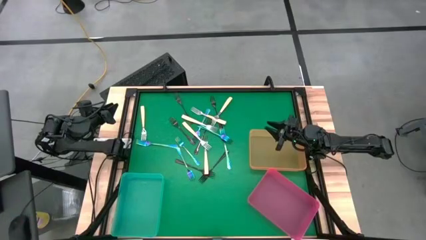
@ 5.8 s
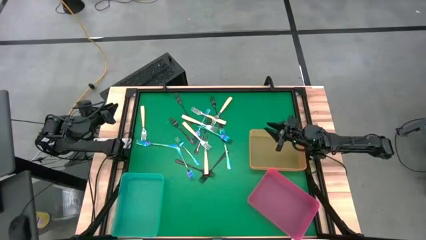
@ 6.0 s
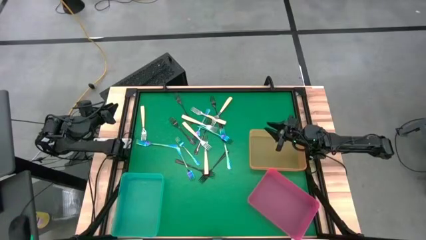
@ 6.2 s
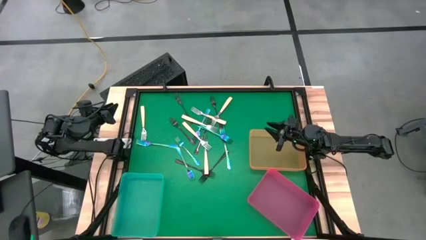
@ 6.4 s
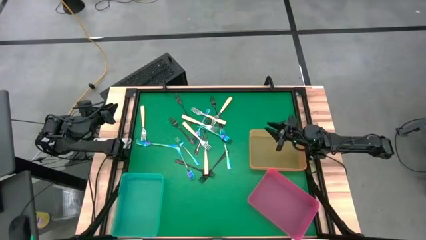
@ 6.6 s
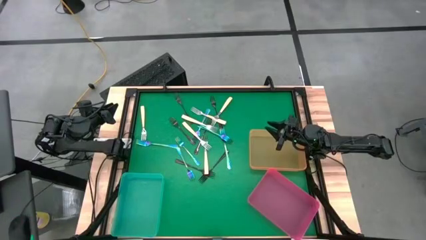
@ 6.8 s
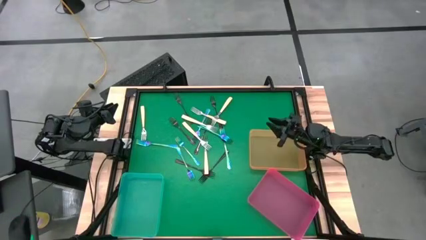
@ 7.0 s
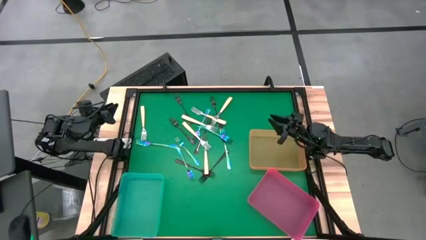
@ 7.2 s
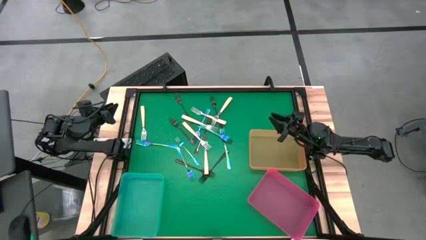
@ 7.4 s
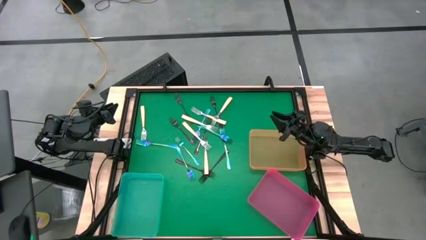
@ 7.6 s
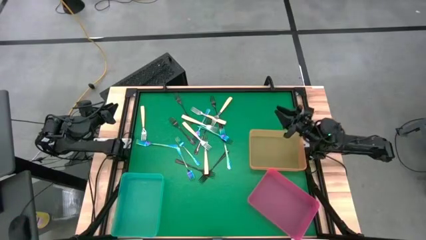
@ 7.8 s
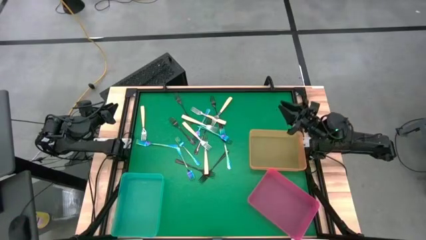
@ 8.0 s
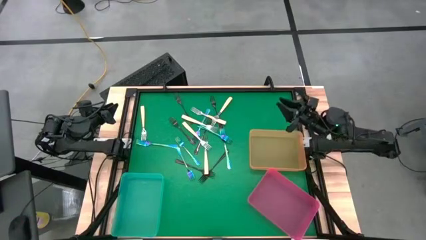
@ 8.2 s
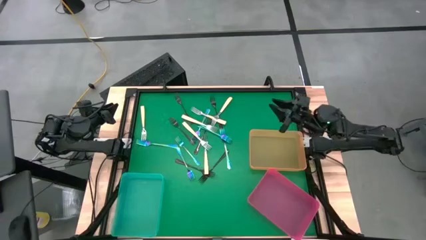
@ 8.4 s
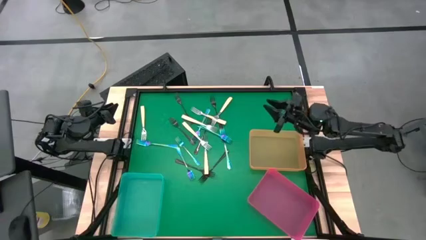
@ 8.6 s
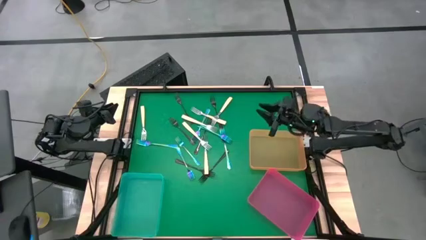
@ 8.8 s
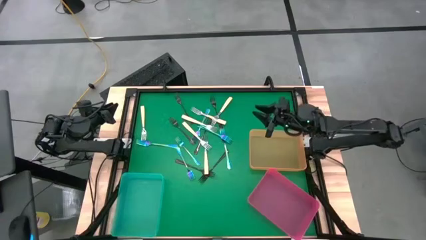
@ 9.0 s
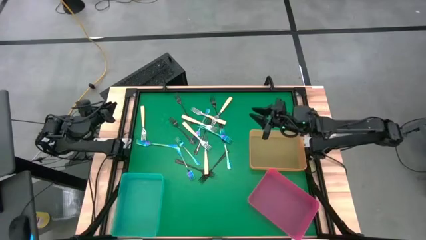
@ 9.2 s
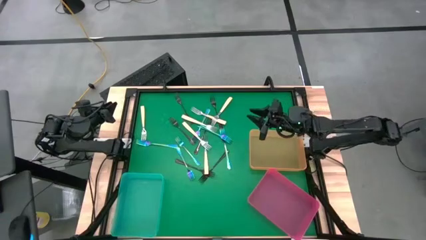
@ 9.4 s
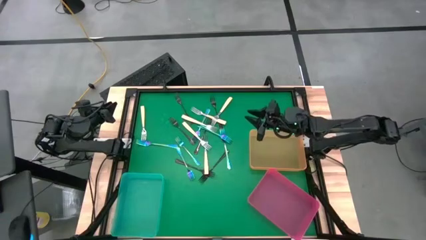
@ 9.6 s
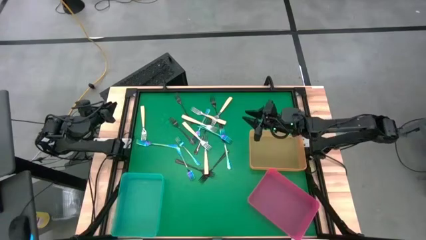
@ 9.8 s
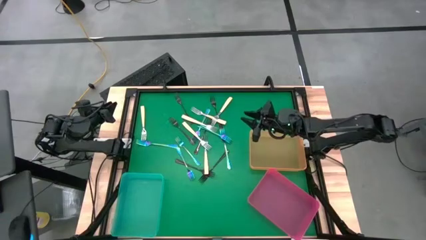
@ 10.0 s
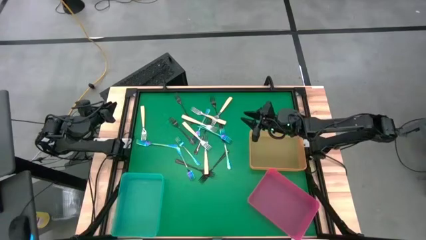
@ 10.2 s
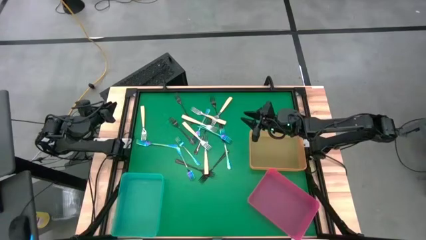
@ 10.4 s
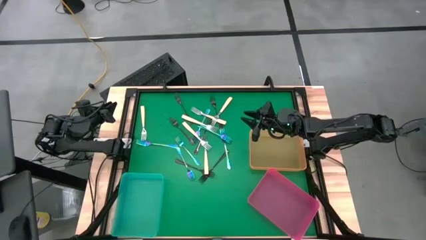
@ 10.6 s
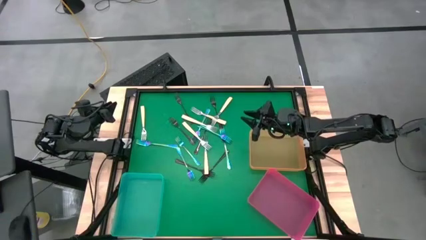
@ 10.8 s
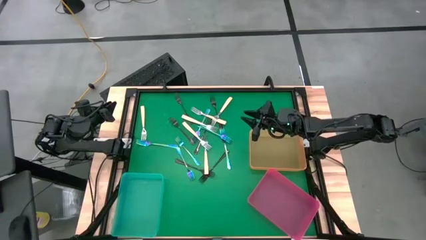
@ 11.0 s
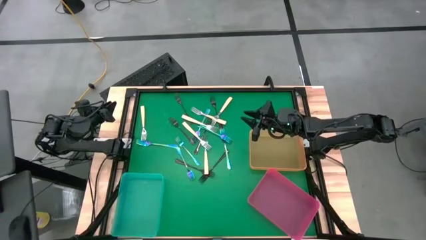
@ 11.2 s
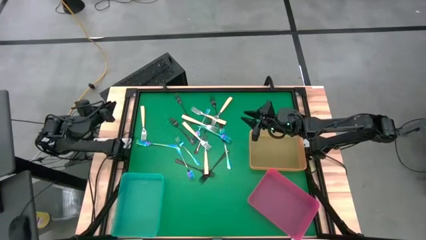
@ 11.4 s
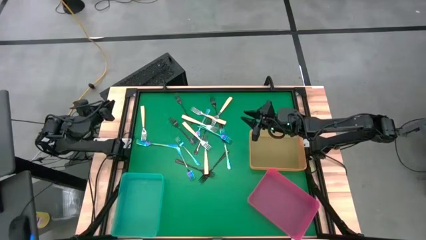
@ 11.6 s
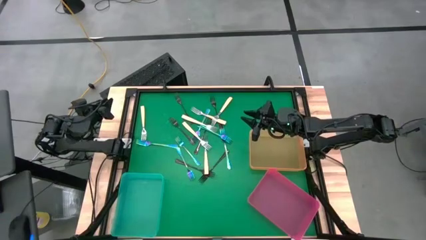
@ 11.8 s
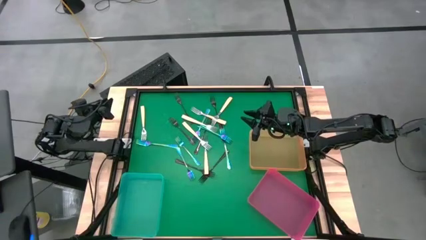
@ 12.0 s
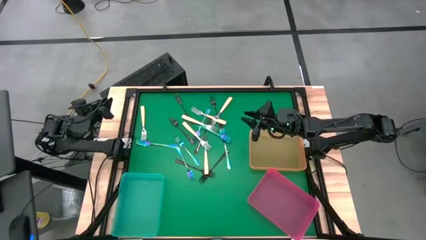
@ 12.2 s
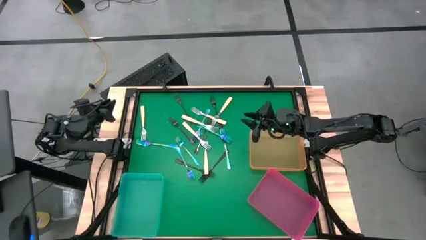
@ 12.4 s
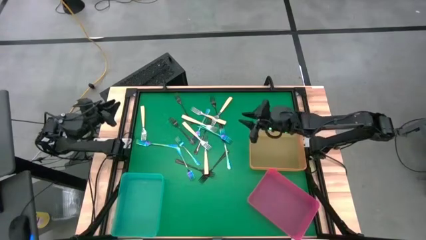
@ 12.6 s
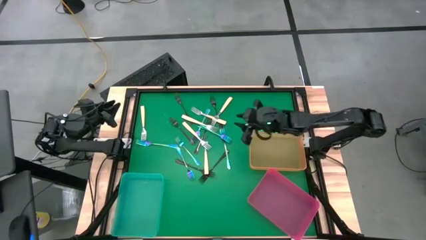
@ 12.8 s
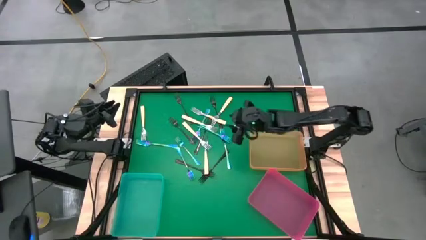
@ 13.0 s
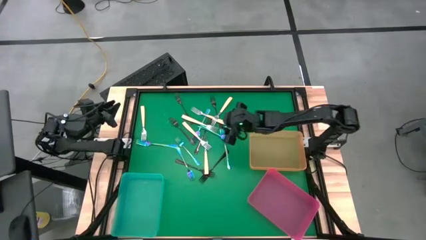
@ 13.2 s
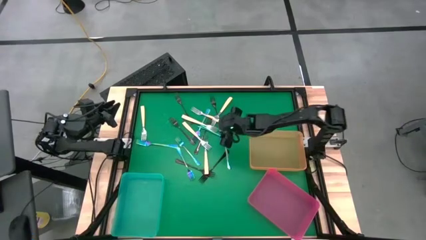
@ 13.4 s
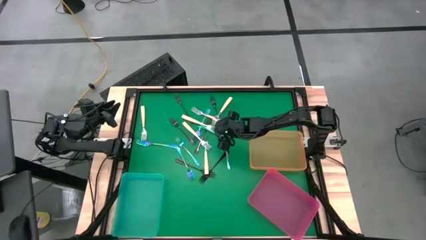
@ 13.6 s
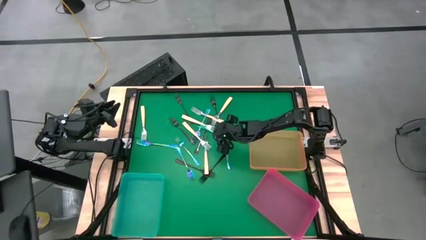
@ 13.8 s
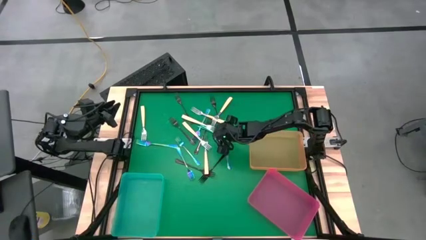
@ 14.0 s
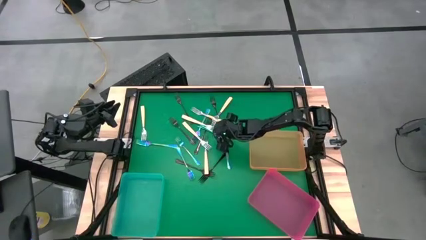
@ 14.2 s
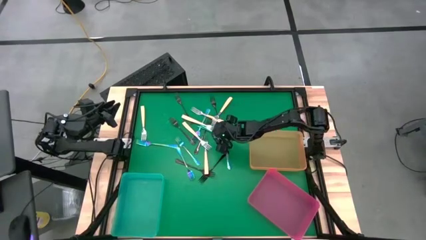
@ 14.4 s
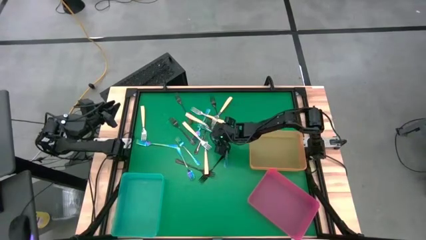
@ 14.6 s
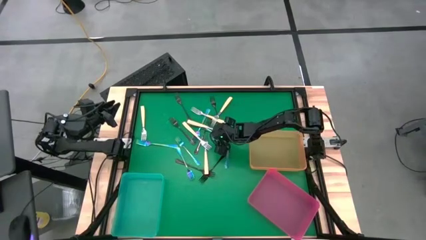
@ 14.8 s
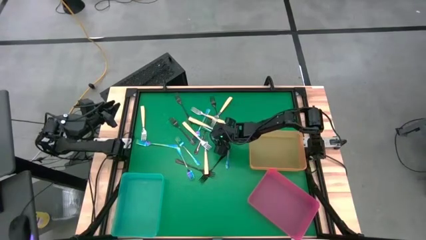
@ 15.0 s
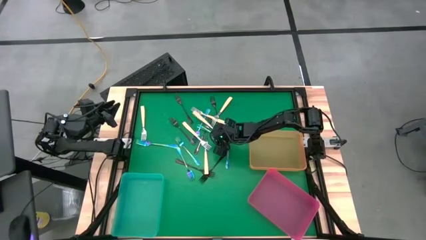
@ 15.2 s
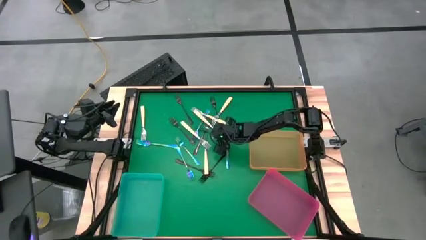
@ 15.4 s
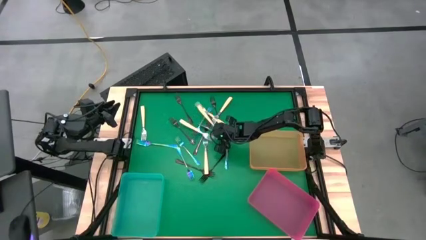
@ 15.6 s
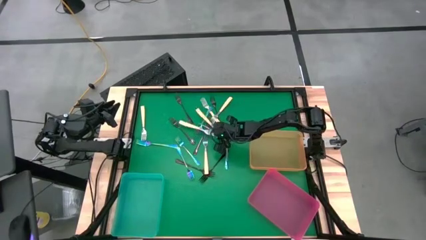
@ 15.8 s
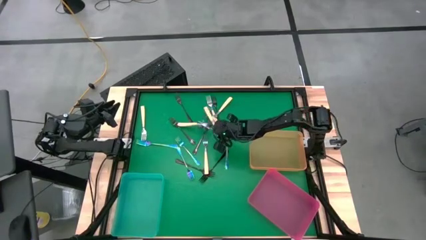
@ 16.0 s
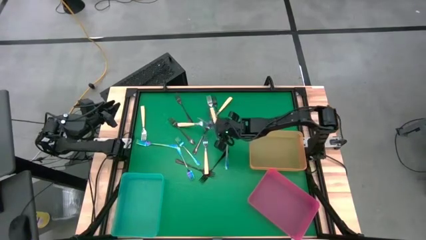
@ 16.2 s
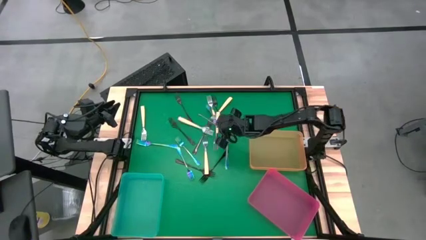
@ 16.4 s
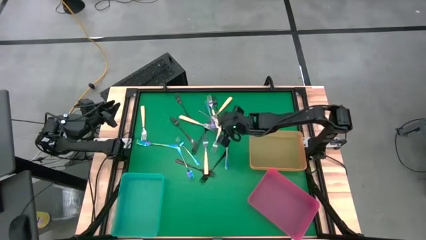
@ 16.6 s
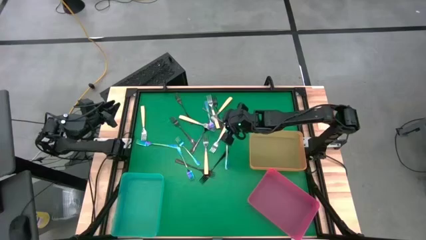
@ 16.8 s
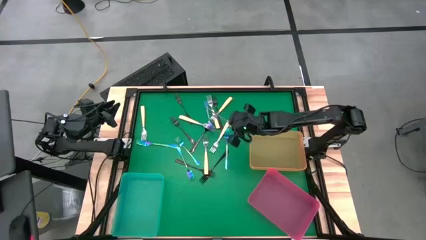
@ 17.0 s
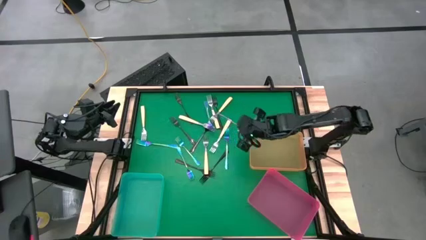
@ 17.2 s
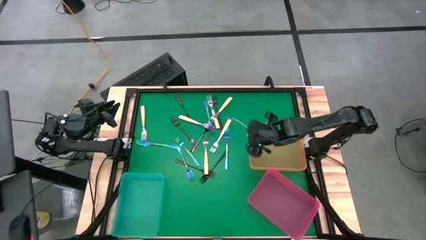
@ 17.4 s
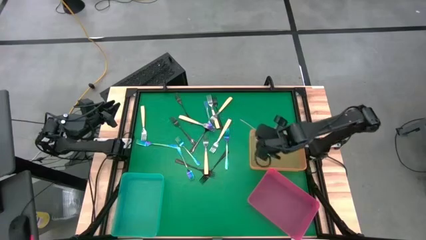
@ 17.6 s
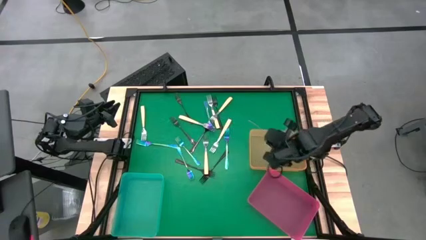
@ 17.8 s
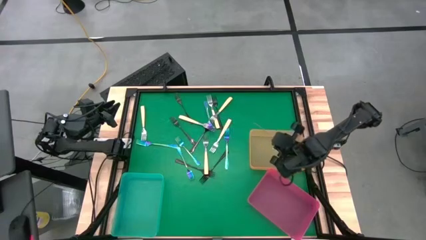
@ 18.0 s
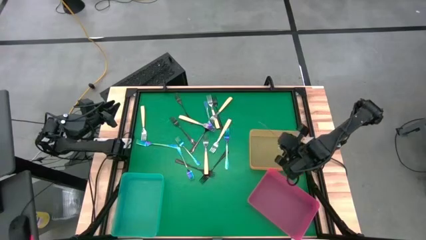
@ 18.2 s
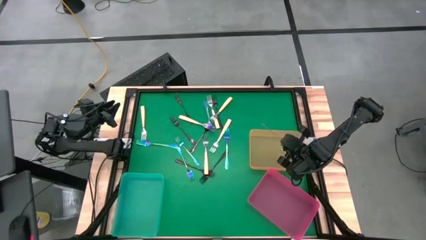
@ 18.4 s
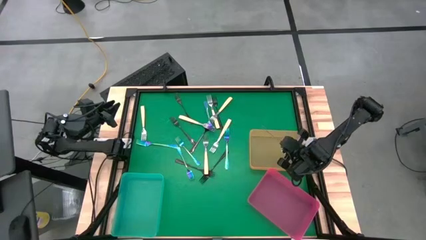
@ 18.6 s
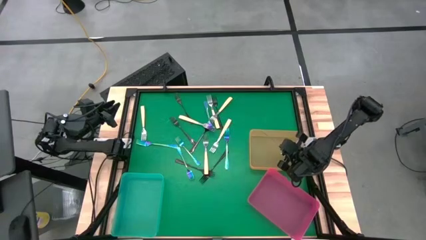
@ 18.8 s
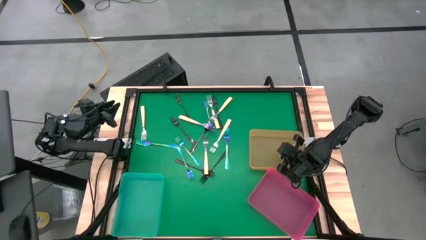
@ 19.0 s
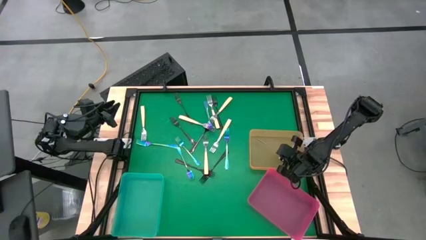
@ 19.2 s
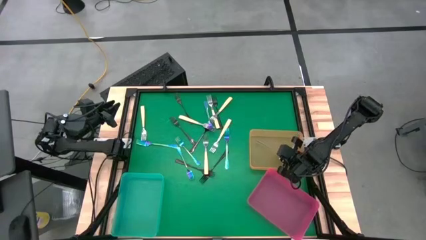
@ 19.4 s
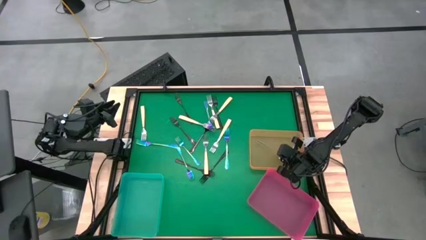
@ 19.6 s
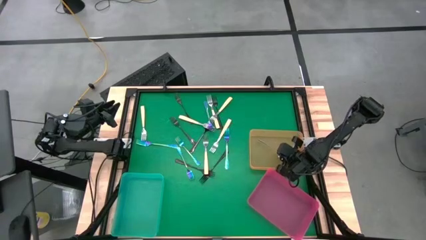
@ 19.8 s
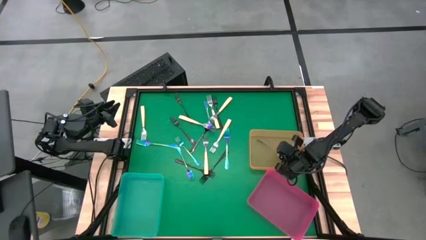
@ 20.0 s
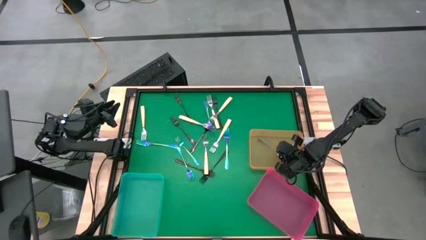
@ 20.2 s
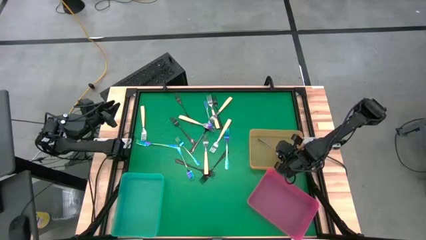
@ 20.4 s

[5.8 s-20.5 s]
Task: Sort silverware by color (type)
Put the blue fork into the orange bin
